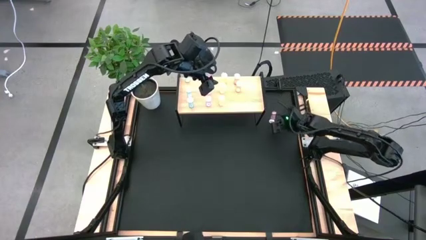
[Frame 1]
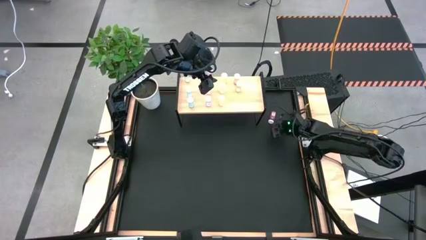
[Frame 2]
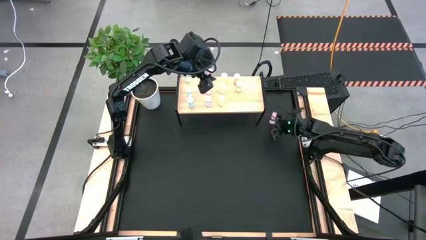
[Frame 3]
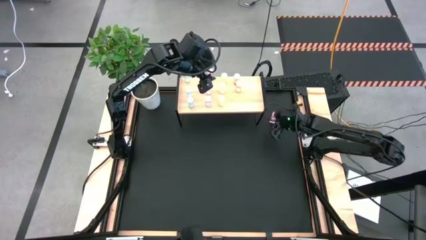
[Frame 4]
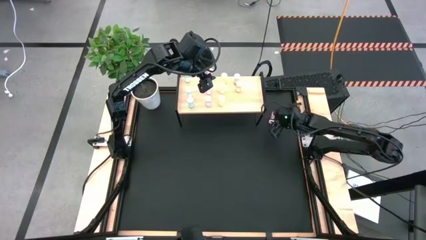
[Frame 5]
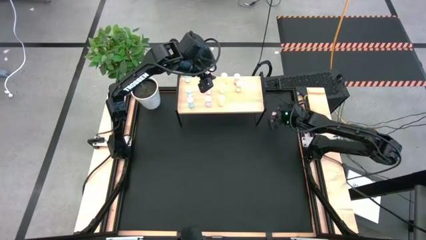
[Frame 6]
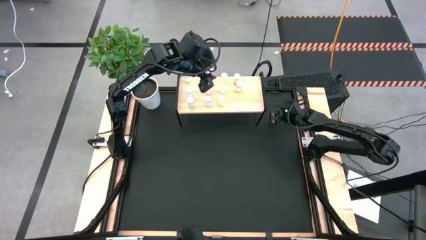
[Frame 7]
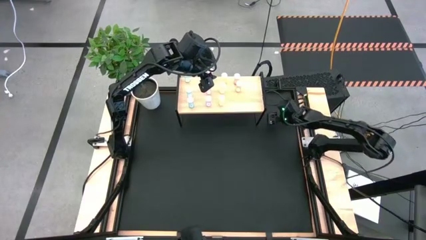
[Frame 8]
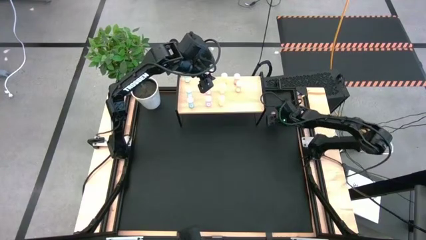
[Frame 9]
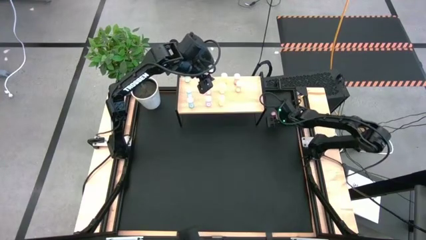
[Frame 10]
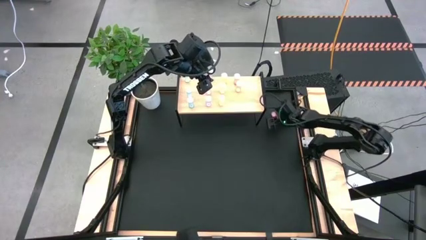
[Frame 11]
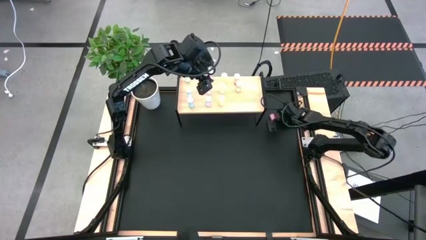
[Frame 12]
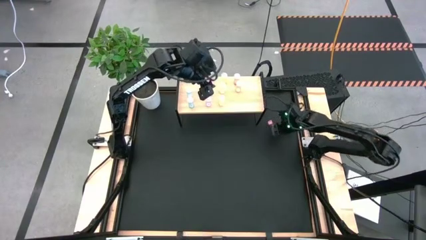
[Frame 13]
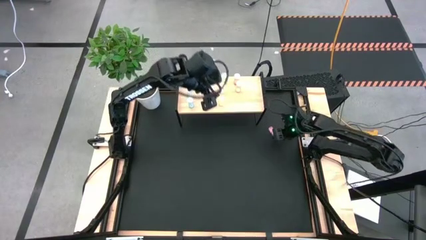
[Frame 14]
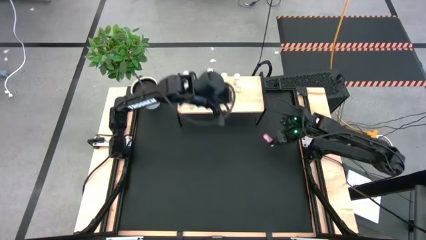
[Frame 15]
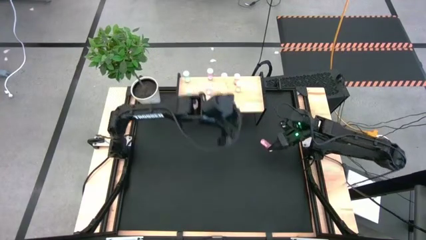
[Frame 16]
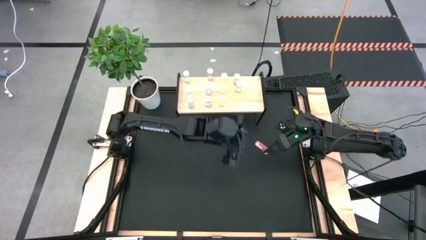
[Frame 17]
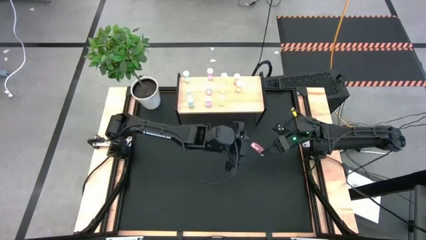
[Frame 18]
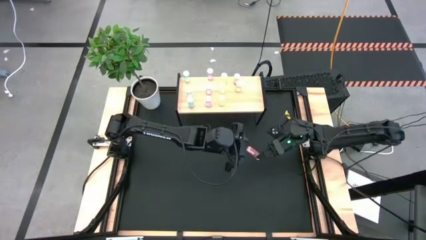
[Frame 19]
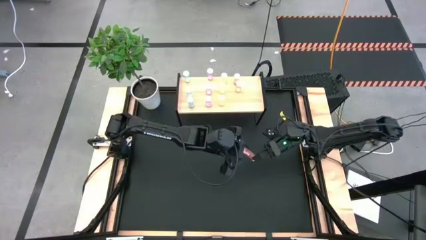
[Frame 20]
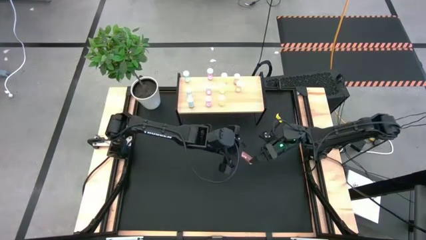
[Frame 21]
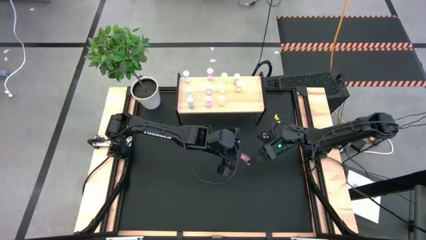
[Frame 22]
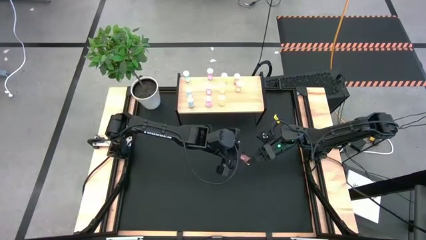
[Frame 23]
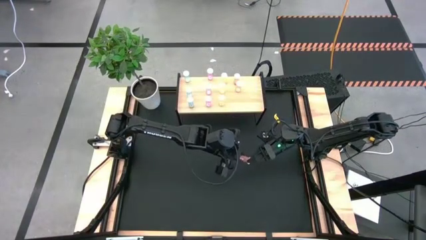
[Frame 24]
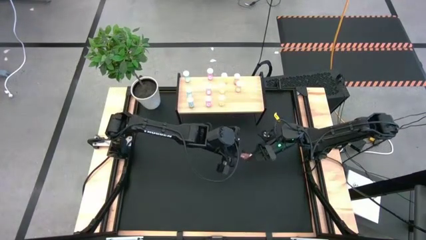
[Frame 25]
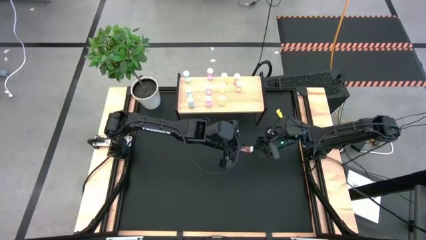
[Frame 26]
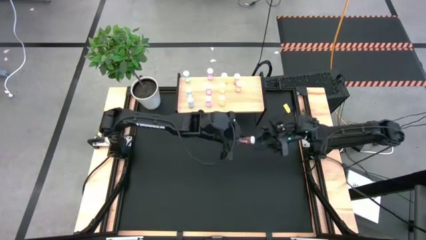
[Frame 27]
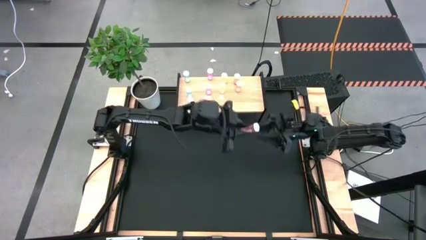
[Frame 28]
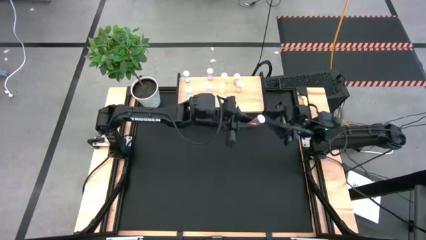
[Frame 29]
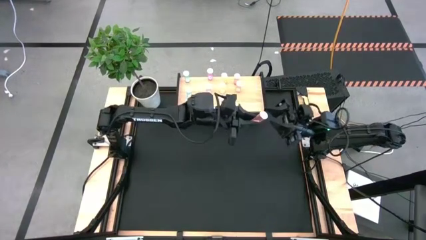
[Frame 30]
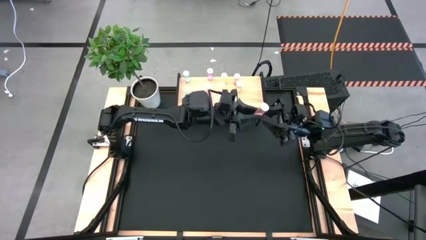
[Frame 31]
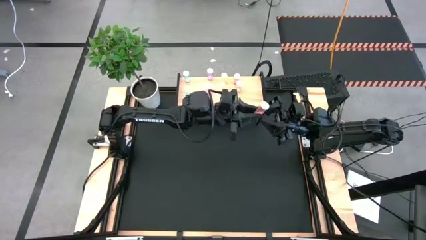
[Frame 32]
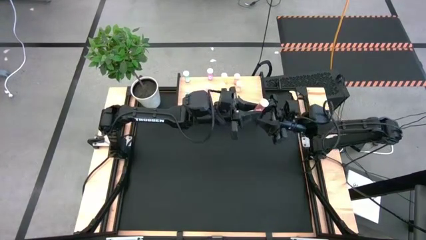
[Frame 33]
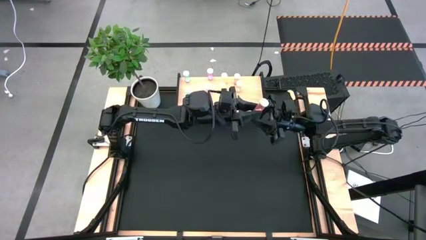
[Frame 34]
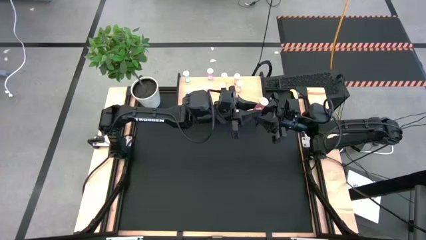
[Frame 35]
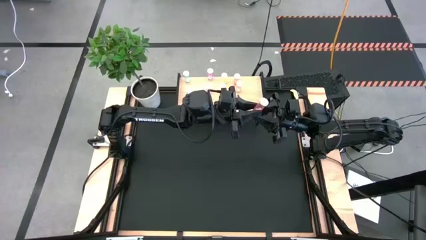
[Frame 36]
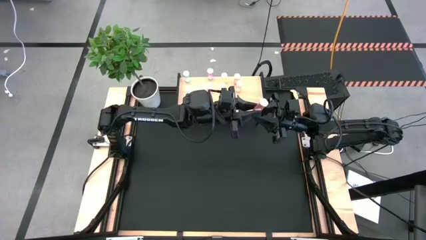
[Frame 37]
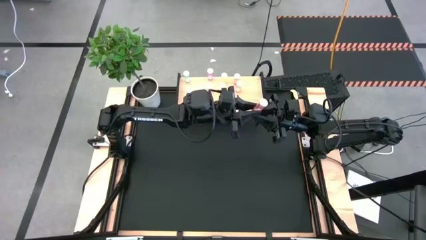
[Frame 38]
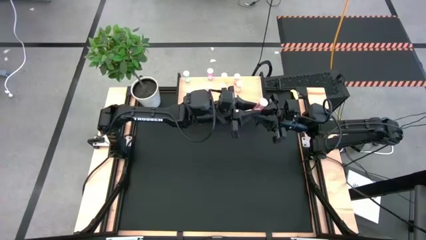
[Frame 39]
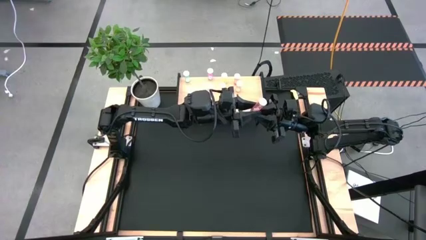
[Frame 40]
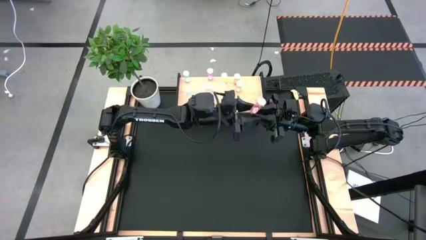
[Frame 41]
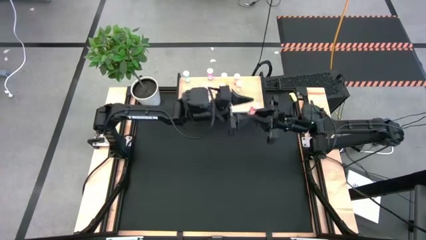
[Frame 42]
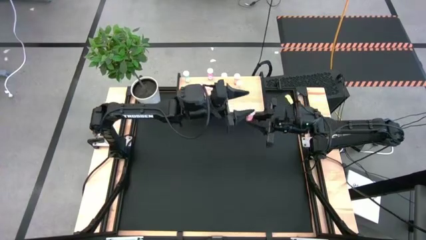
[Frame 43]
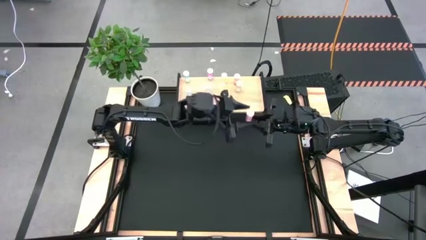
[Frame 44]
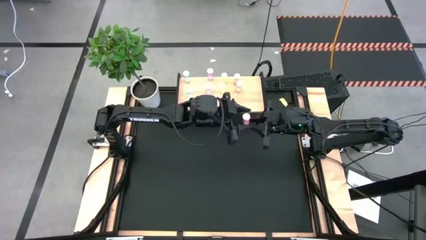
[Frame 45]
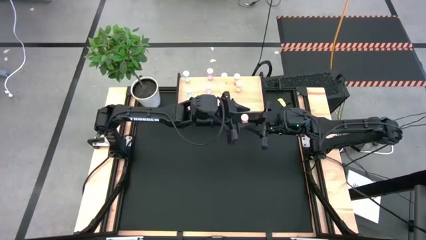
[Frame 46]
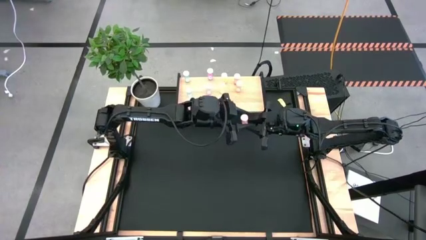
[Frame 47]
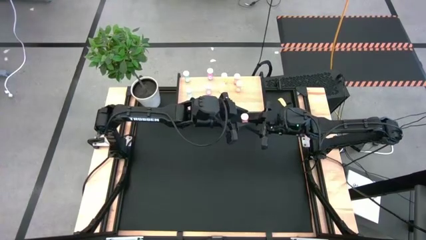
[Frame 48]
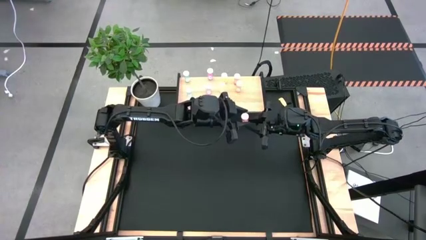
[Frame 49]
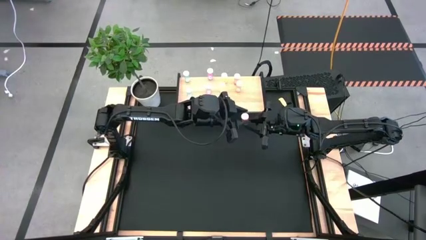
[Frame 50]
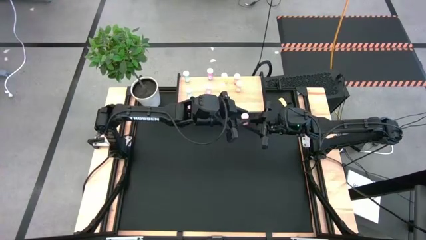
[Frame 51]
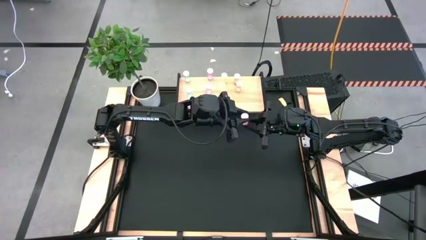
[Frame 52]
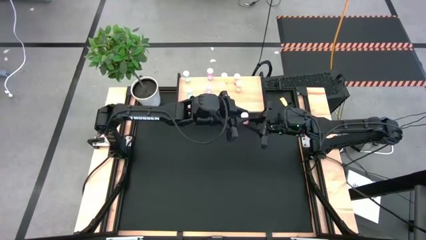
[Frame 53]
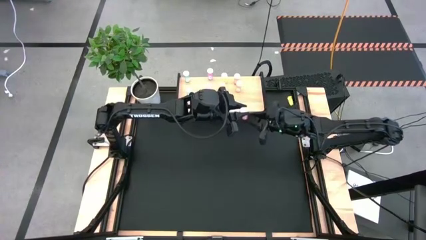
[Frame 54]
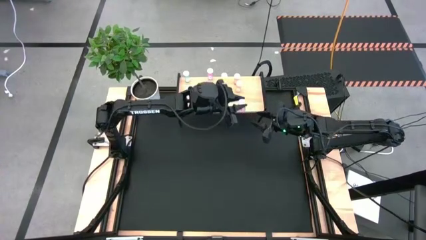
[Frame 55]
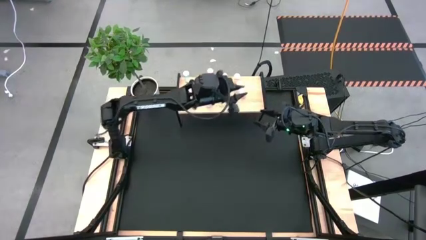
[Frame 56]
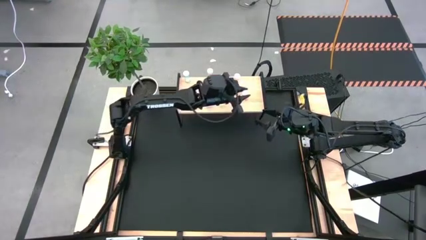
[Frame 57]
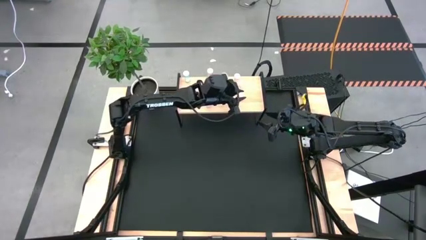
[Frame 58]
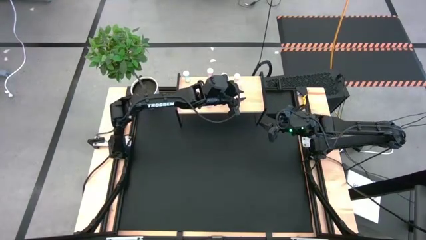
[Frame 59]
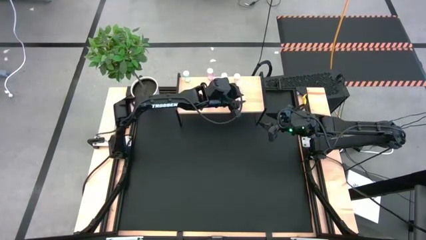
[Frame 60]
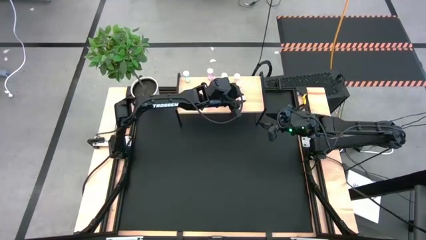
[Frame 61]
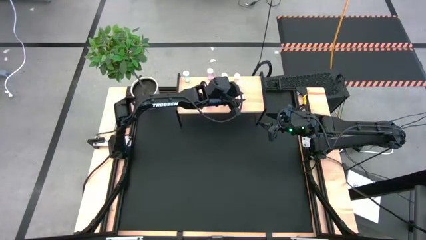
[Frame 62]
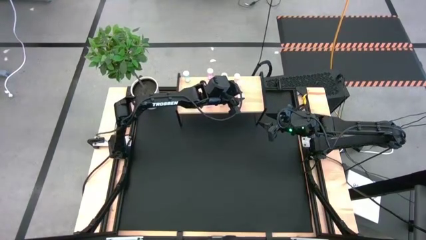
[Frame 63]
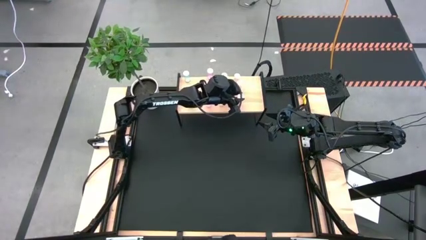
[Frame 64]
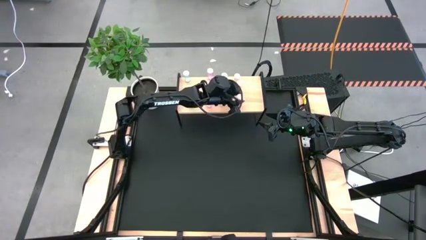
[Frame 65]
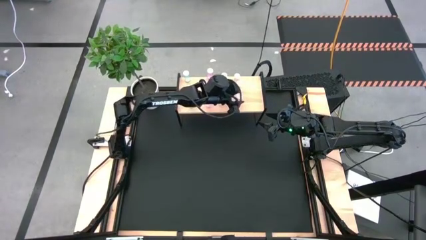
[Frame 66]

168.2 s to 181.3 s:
Task: Pick and place medicine bottles onto shelf by color
Put the orange pill bottle on the shelf aligned with the other orange pill bottles
